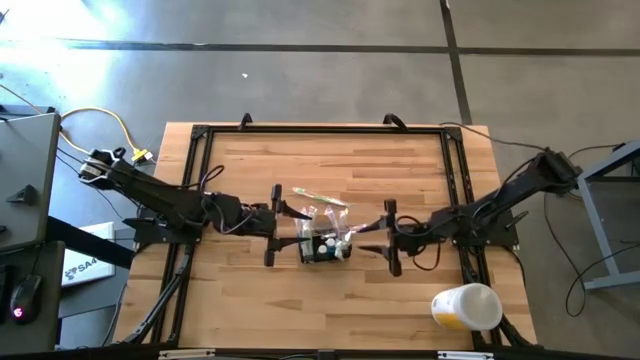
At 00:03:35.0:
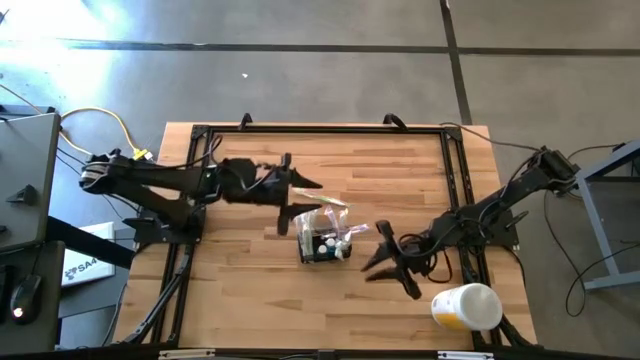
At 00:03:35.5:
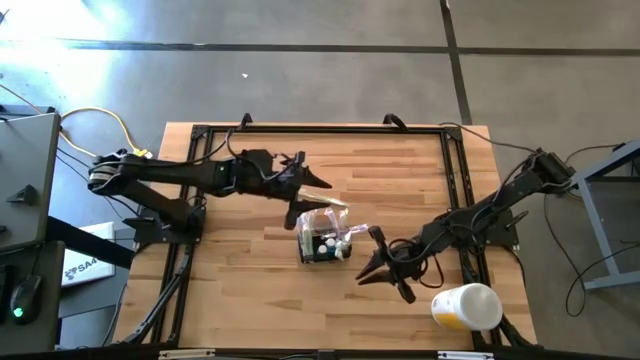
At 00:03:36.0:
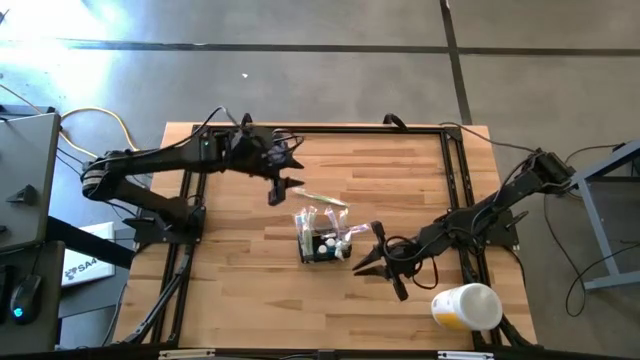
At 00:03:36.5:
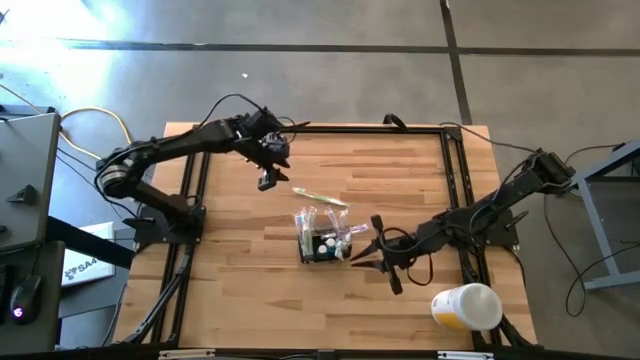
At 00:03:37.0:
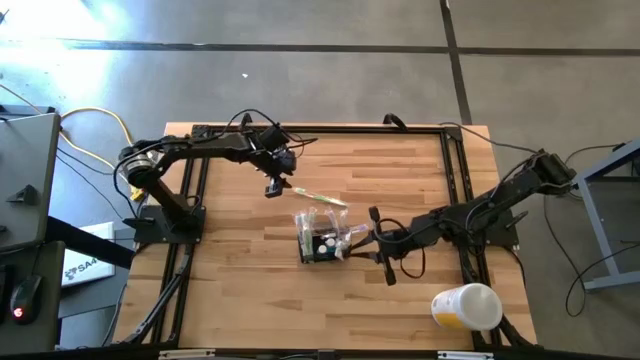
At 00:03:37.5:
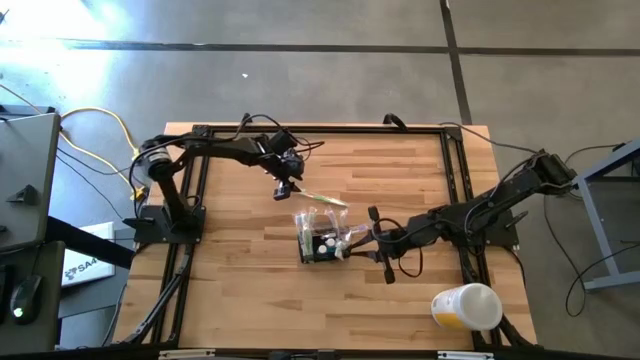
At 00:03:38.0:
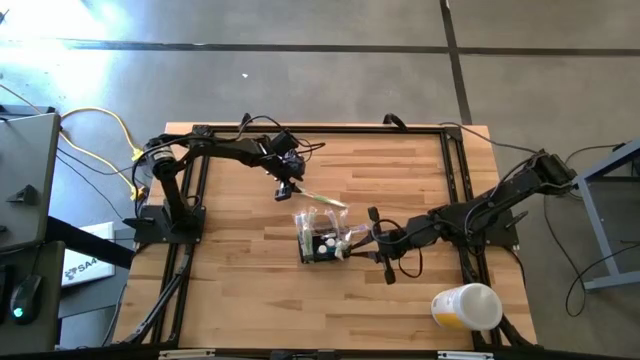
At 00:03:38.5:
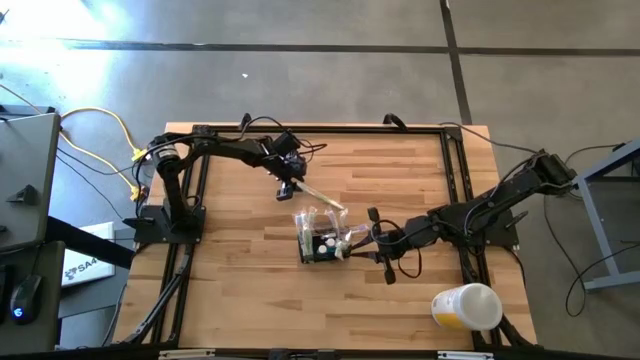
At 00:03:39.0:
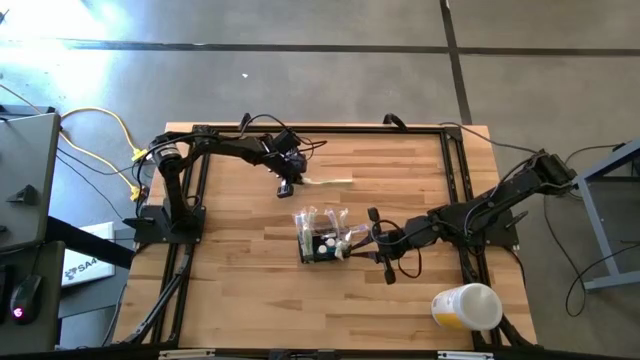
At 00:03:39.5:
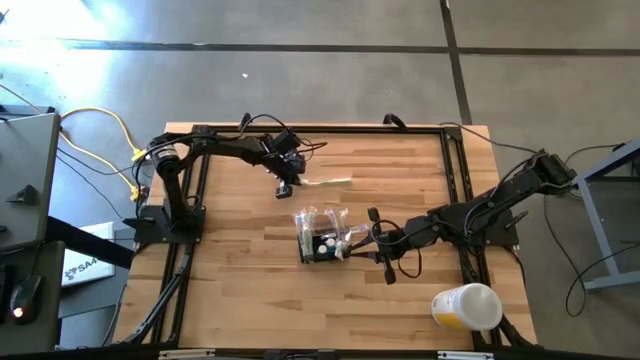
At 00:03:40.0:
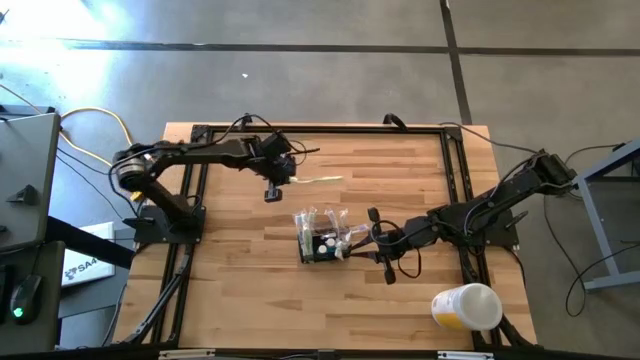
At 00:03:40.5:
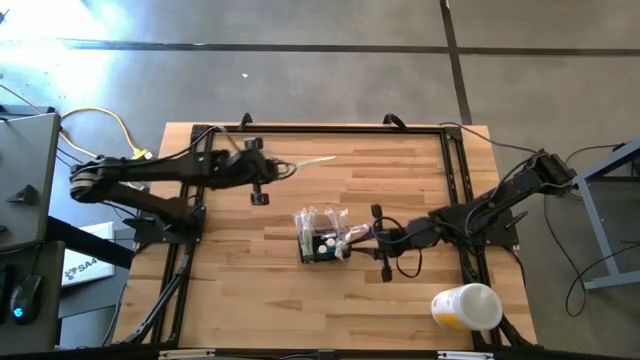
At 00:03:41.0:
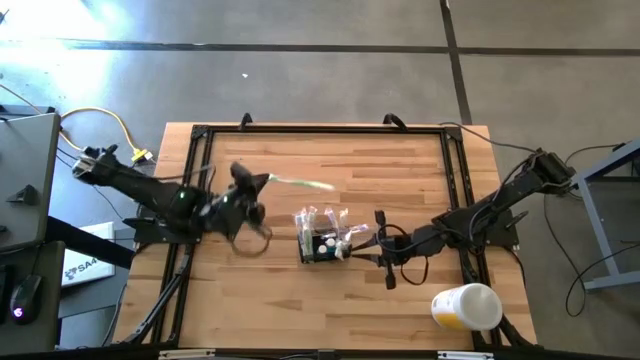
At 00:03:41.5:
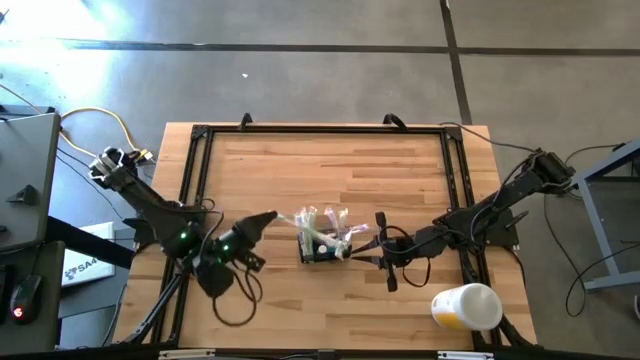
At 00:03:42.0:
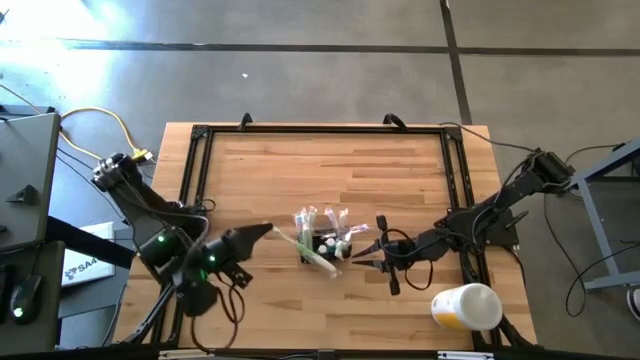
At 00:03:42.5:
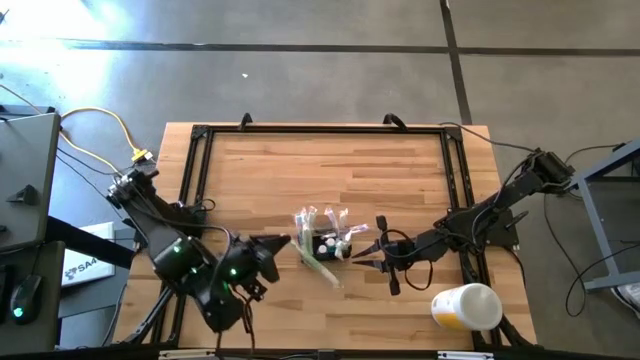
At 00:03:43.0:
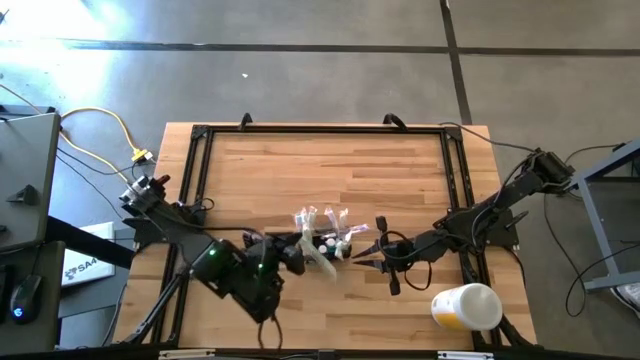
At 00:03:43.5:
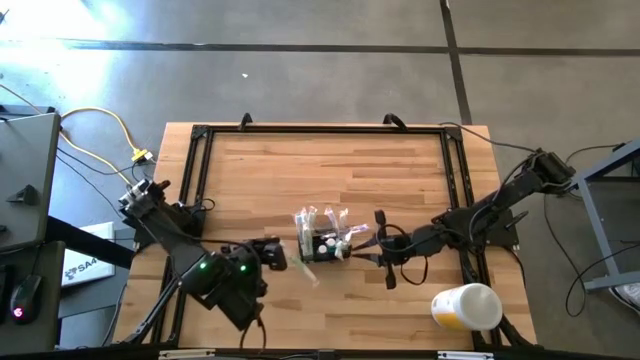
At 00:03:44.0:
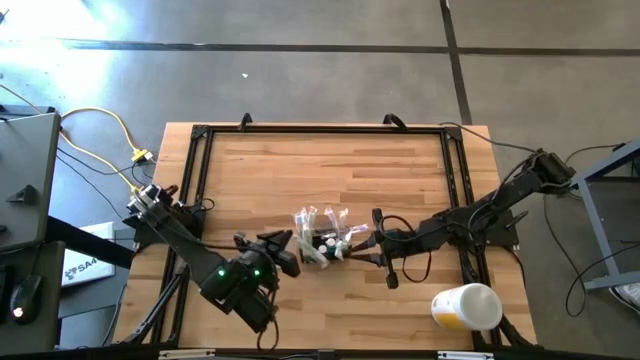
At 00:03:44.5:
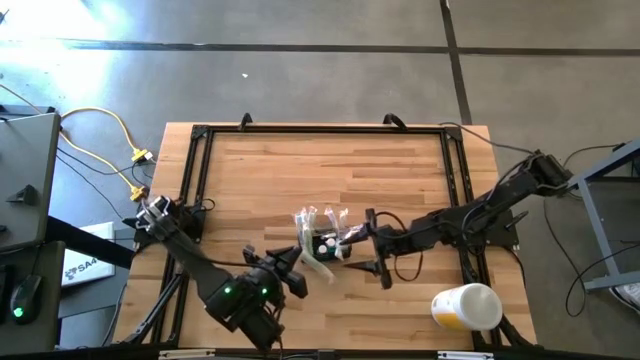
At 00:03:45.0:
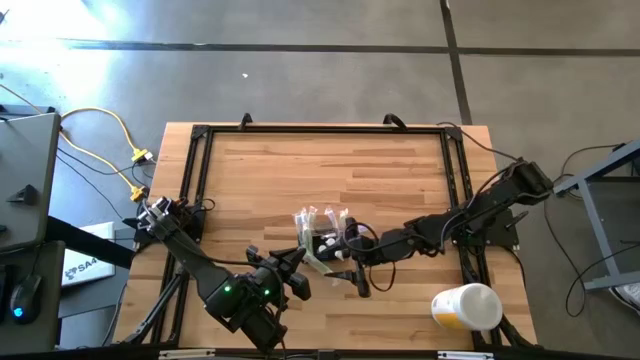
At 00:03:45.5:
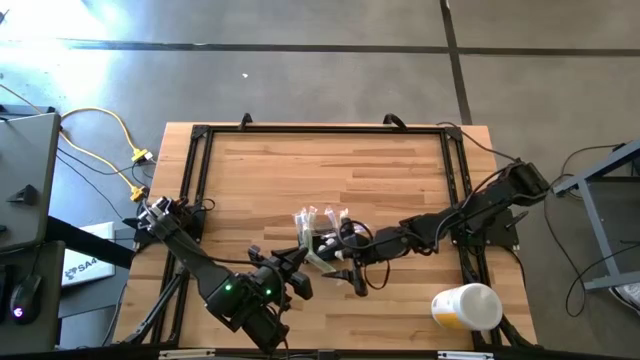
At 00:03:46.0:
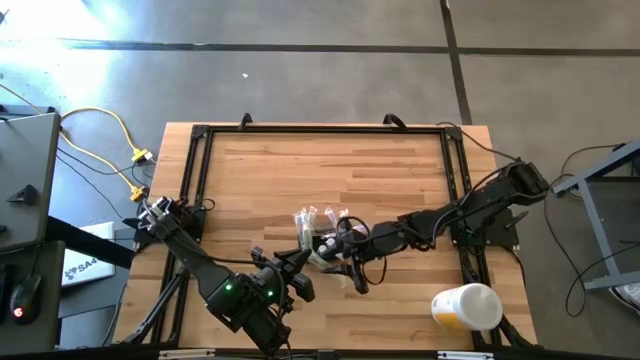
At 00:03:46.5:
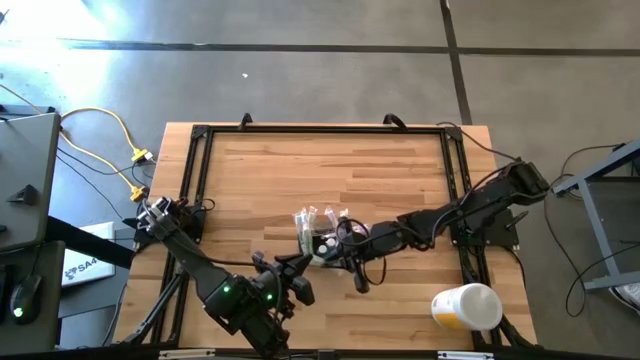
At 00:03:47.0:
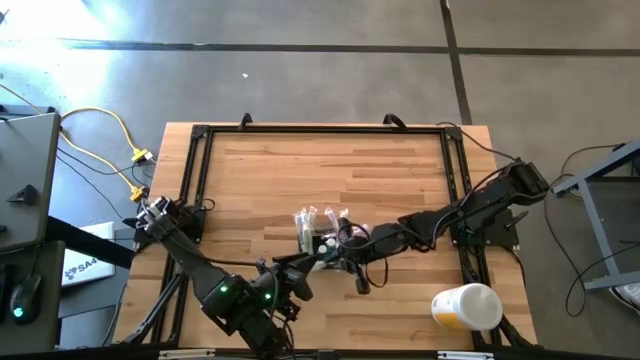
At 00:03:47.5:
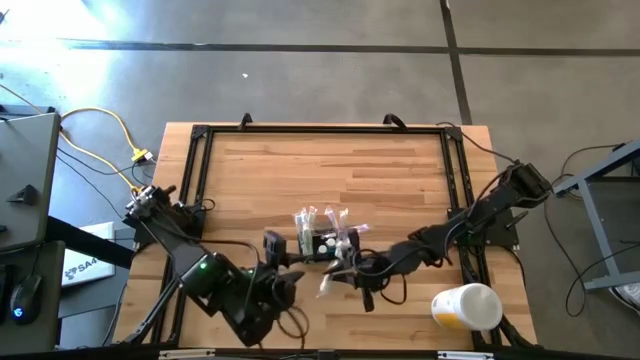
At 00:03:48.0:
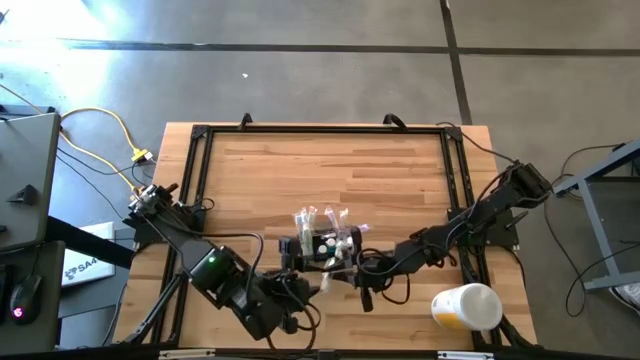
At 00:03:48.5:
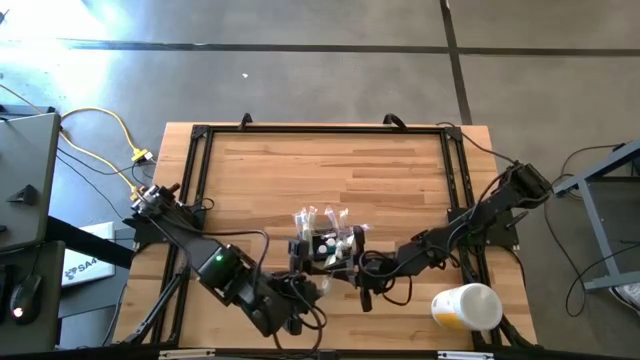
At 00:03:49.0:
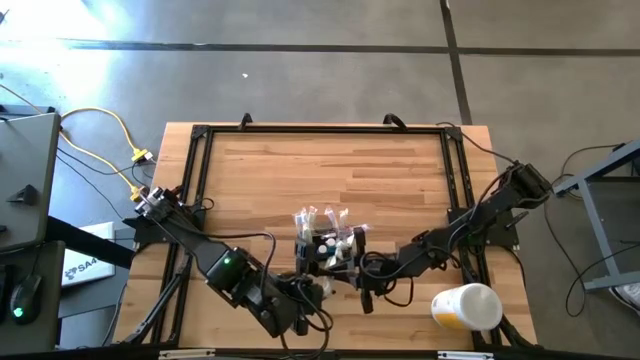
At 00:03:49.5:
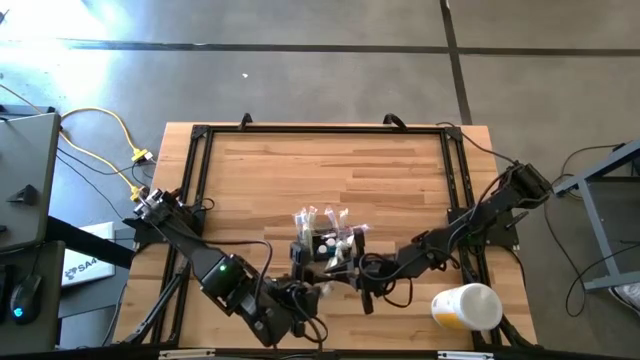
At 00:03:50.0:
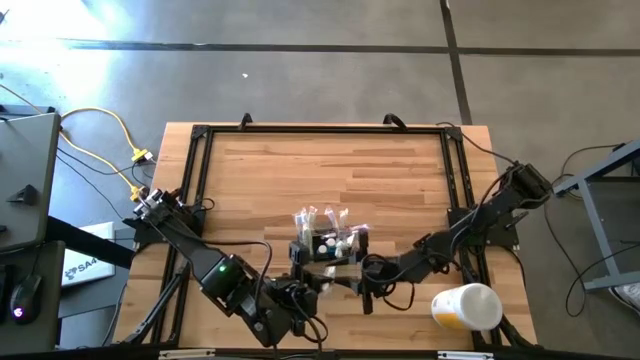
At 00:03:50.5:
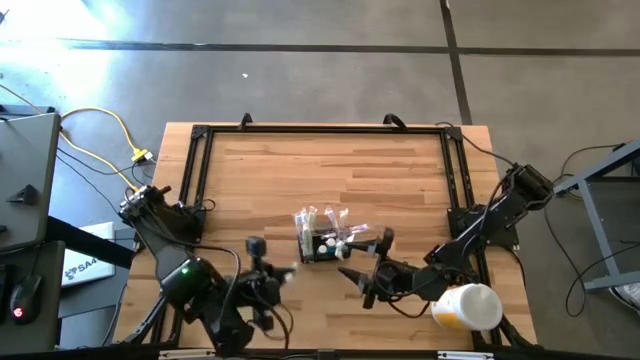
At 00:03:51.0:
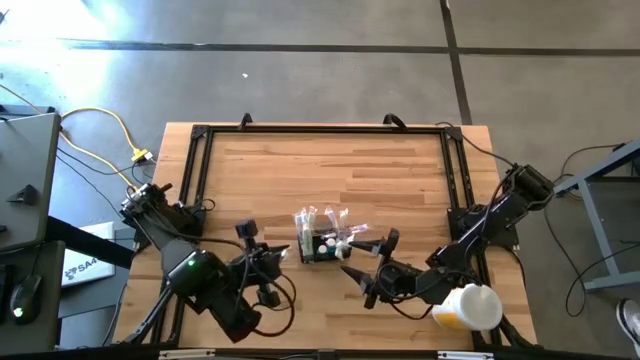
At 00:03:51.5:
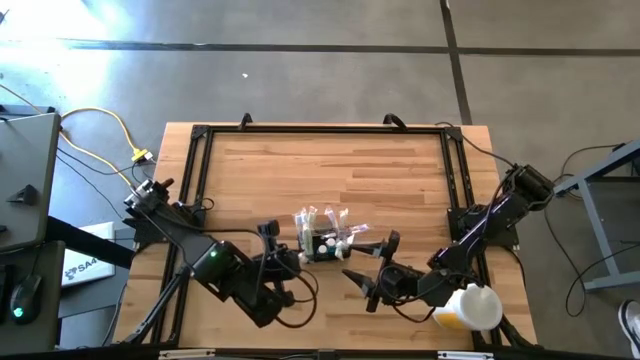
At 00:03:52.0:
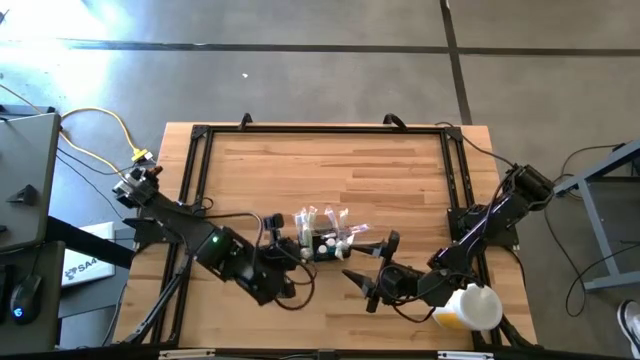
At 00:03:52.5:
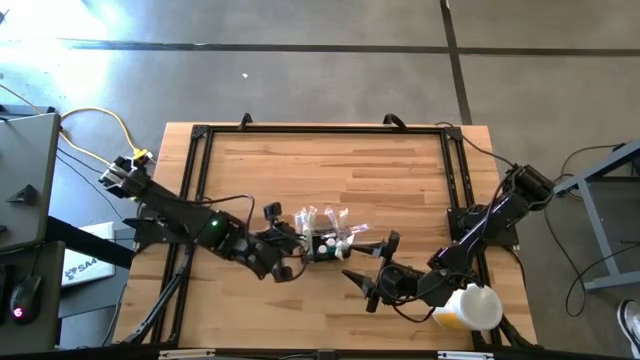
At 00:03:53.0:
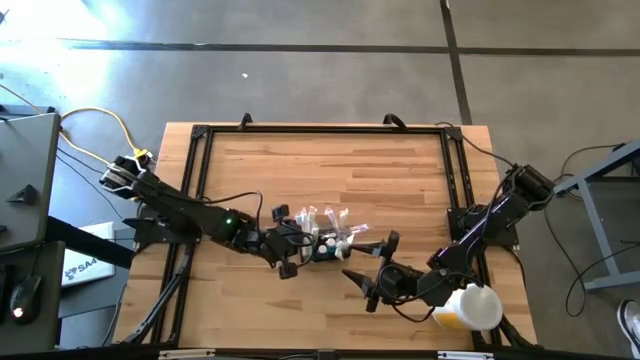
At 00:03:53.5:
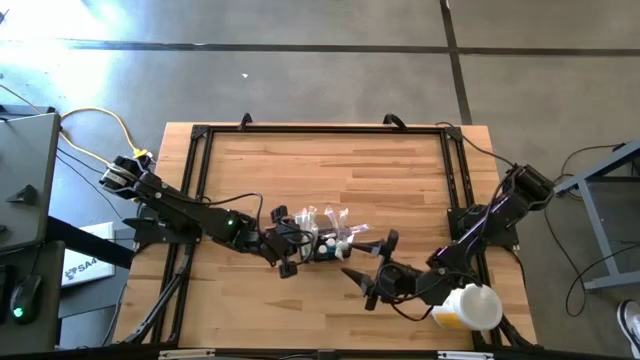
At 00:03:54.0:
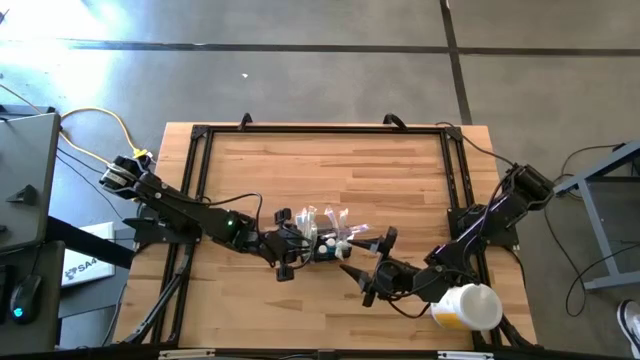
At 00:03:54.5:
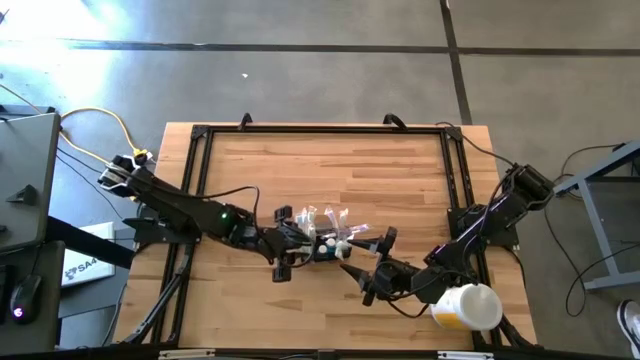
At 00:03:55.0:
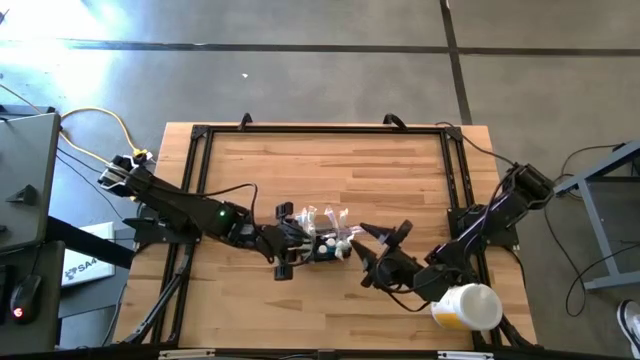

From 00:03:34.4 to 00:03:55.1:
Task: Pick & Place toothbrushing station
Put the green toothbrush into the wire organizer

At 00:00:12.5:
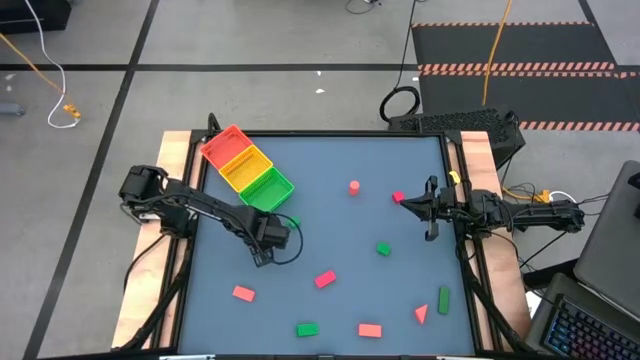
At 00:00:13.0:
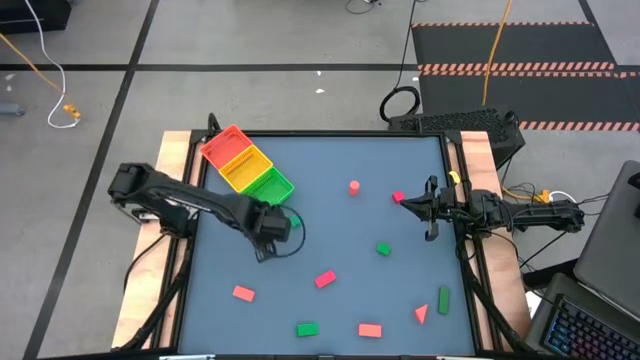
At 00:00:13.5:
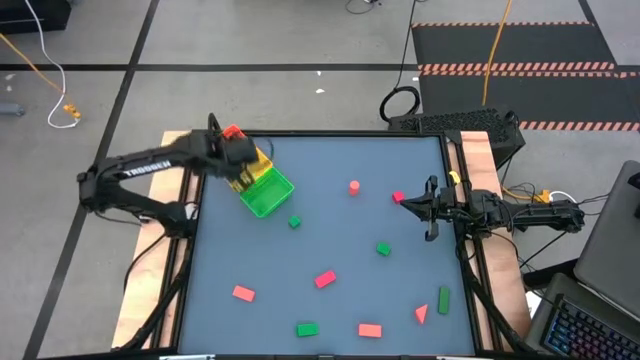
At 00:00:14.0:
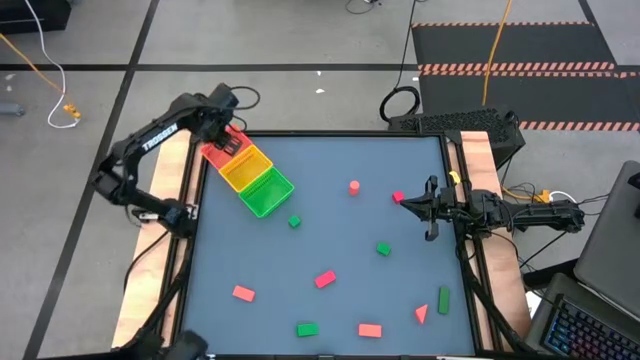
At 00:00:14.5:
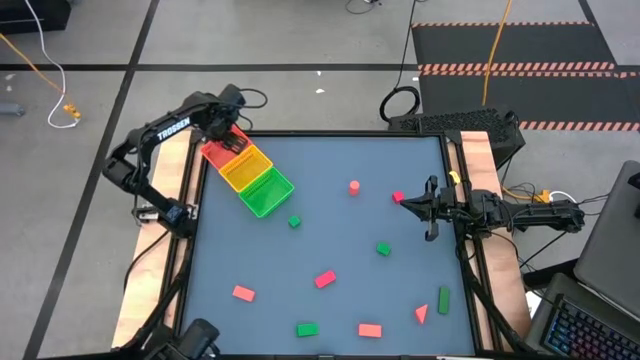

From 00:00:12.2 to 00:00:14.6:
Task: Sort & place blocks by color
Put the red block into the orange basket
